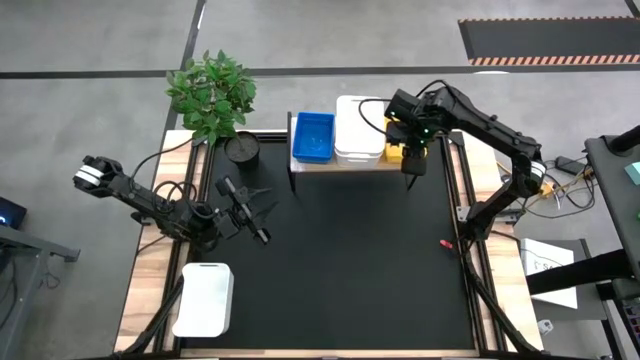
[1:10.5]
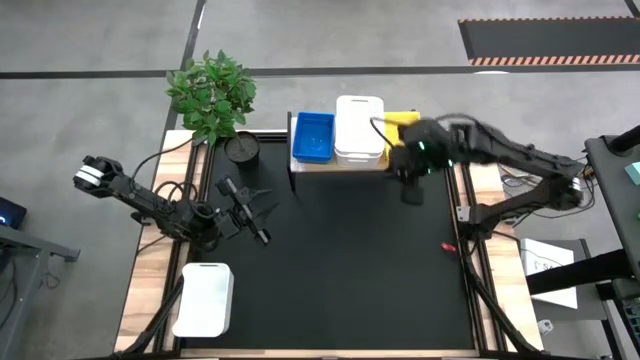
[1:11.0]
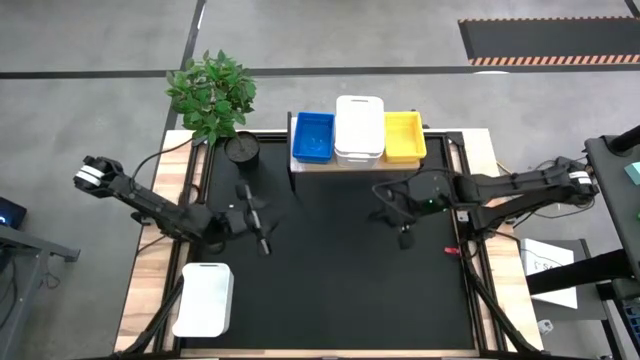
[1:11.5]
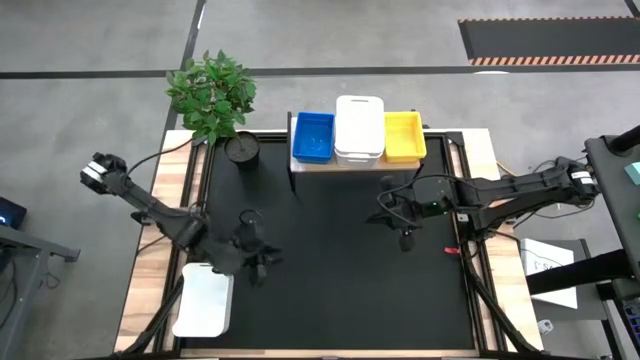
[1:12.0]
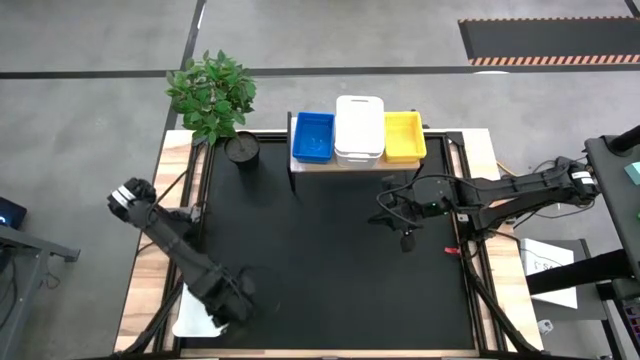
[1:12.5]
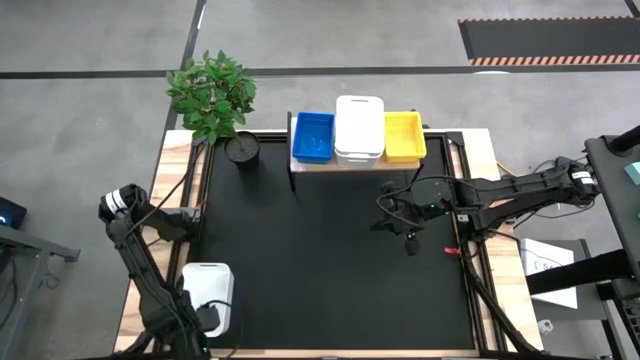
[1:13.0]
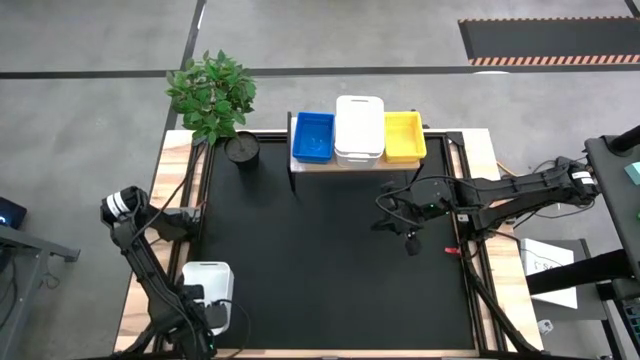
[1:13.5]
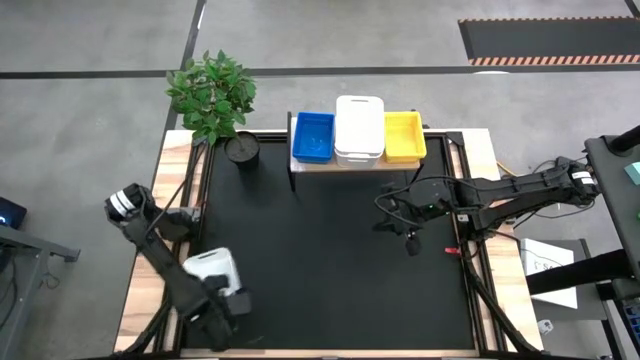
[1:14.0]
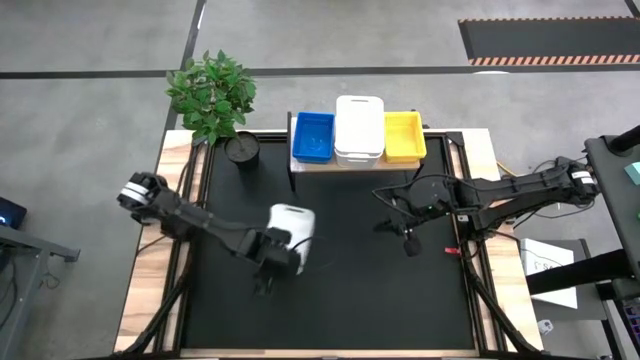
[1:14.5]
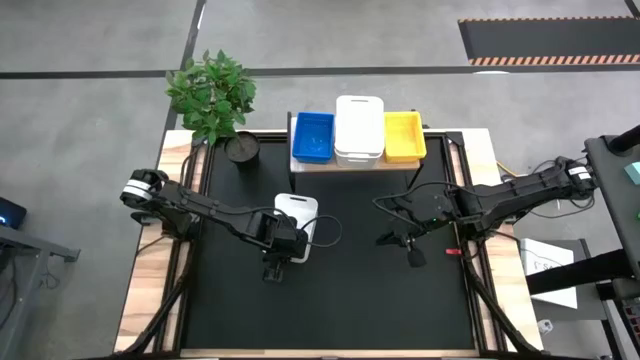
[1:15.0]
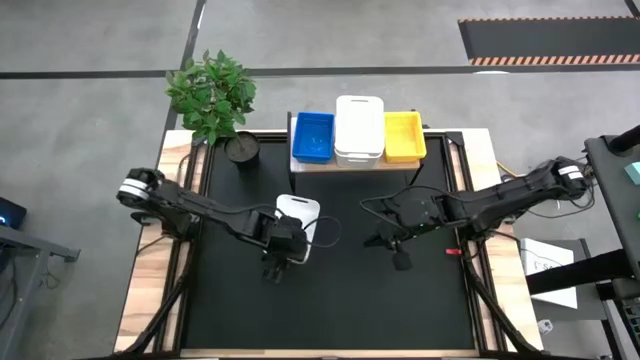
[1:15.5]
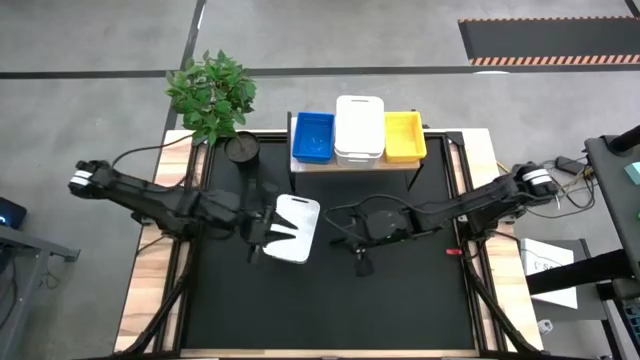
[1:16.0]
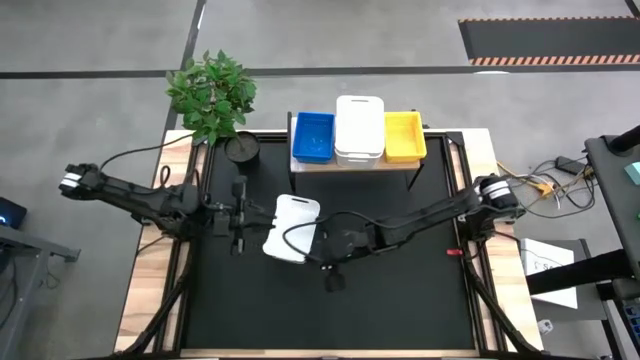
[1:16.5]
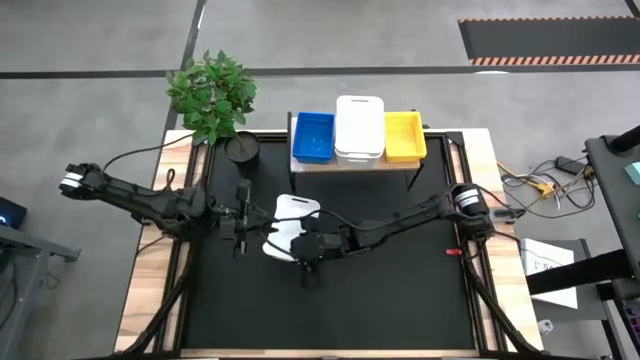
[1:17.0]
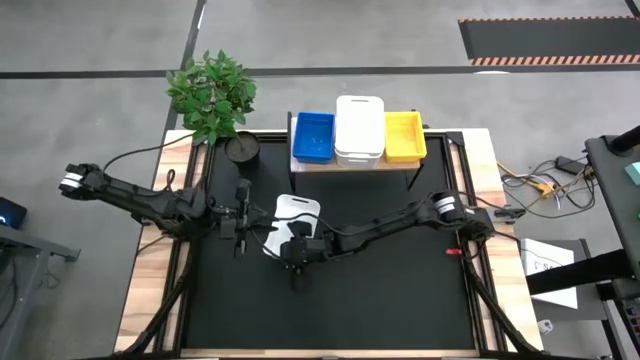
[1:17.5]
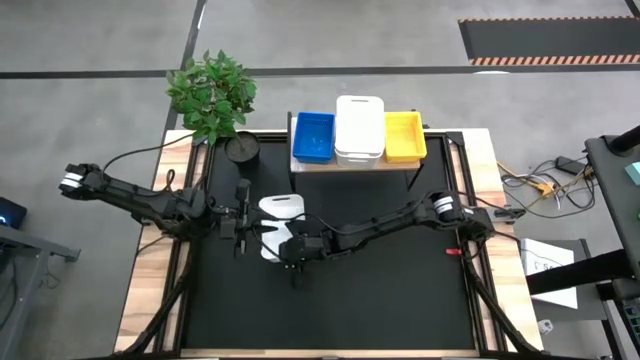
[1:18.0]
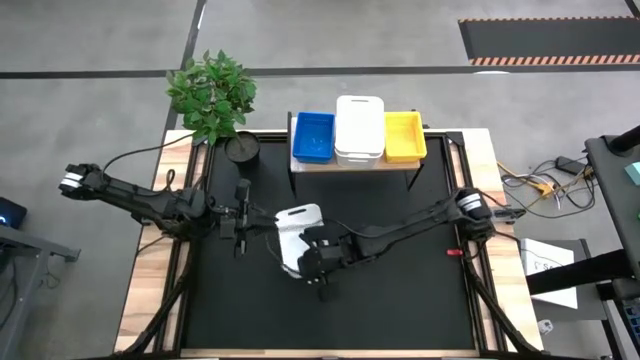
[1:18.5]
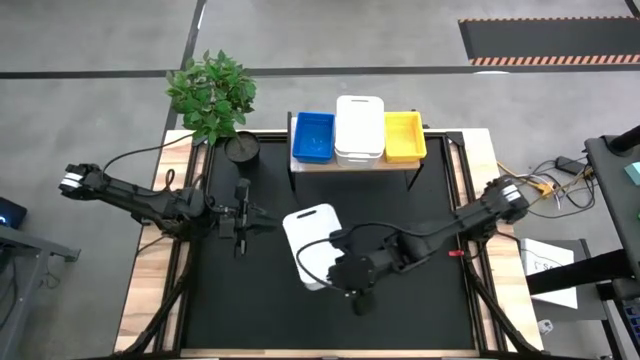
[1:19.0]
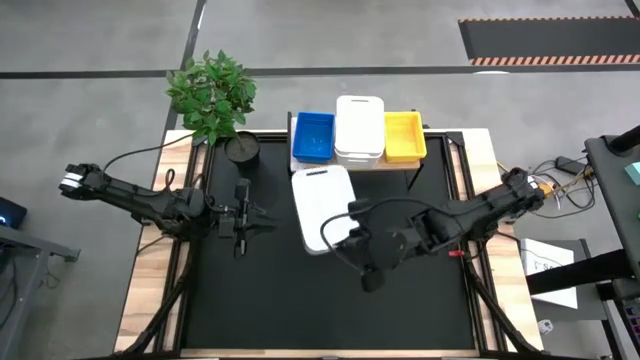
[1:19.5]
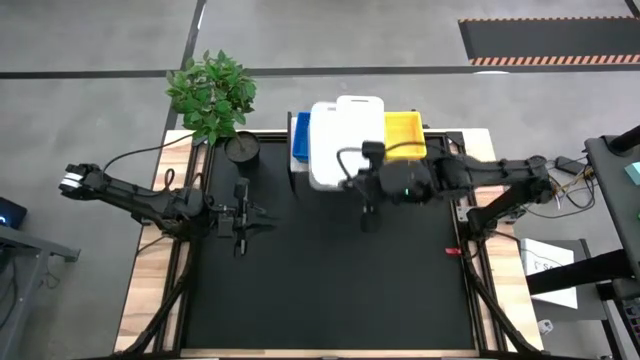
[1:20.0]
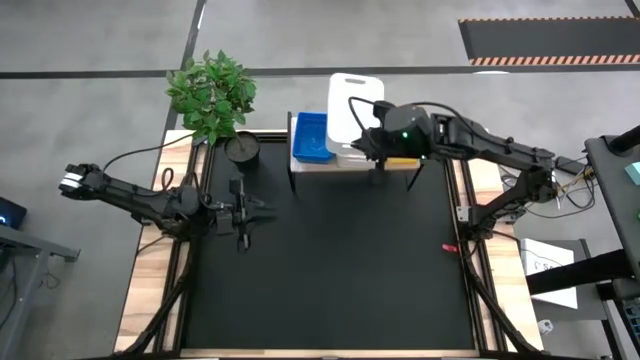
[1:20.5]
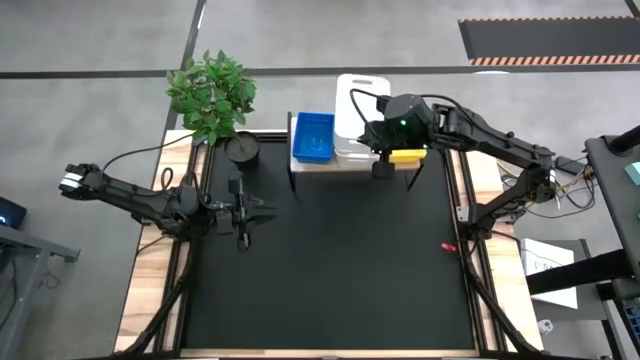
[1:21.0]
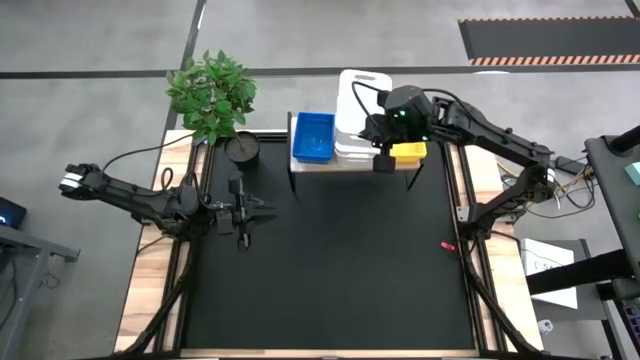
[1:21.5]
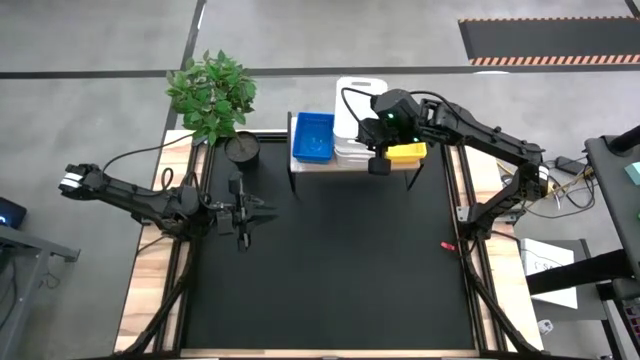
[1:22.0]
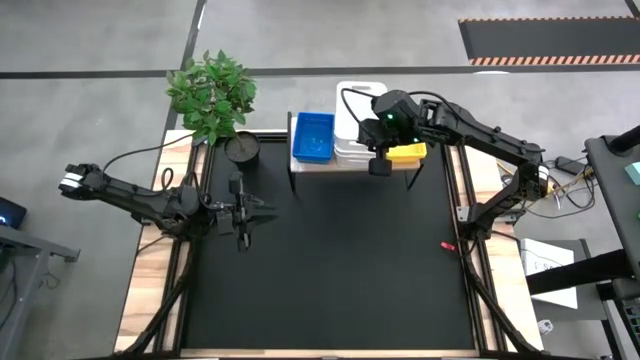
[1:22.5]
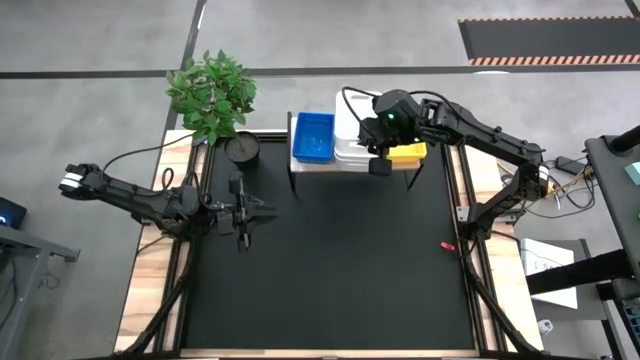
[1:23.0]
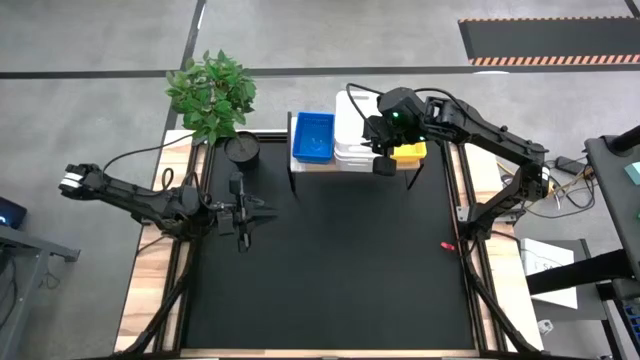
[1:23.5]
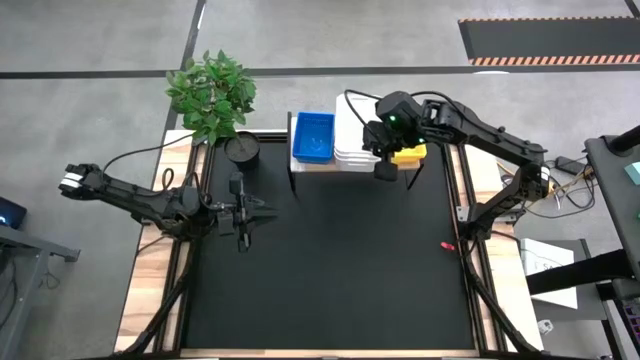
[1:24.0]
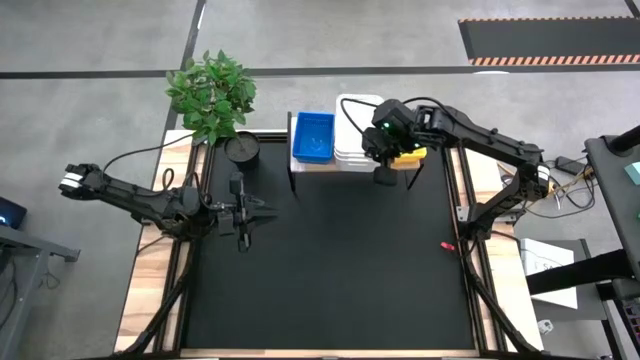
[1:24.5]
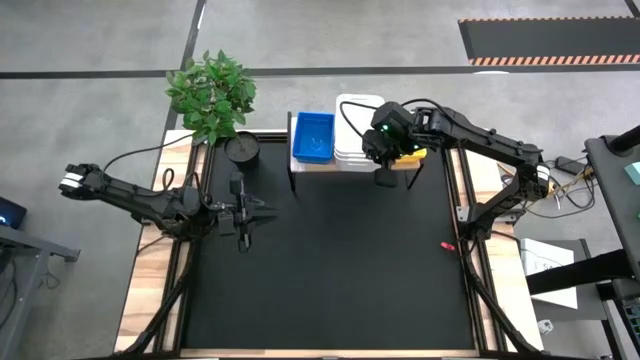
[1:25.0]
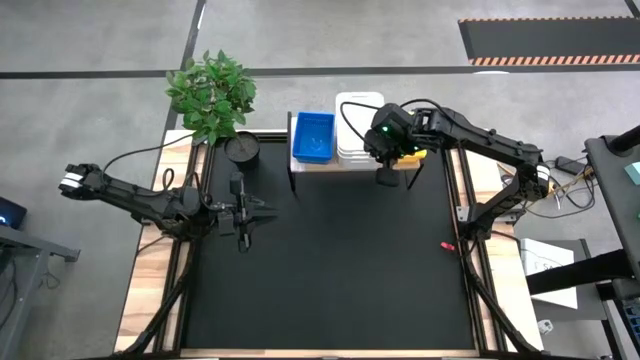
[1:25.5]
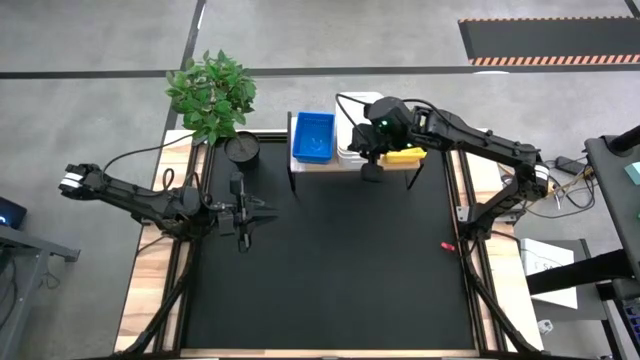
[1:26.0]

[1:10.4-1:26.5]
Task: Stack baskets on shelf by color
Stack the white bin on the other white bins on the shelf

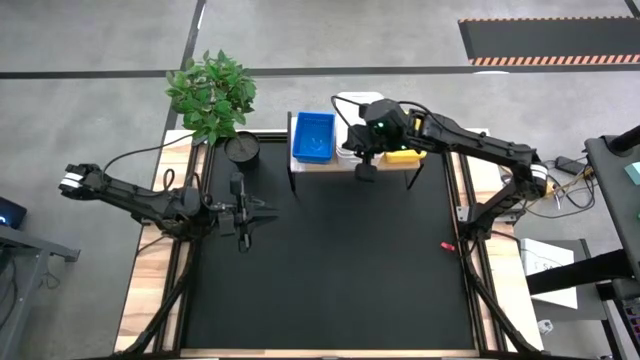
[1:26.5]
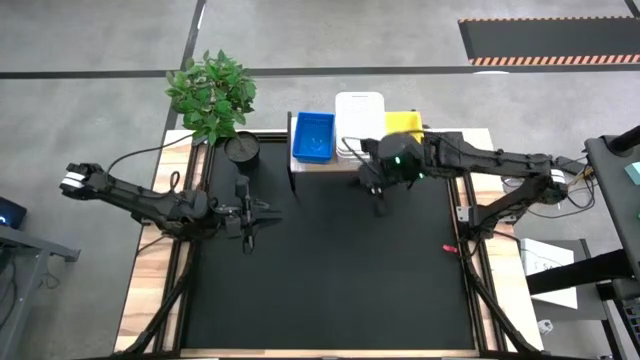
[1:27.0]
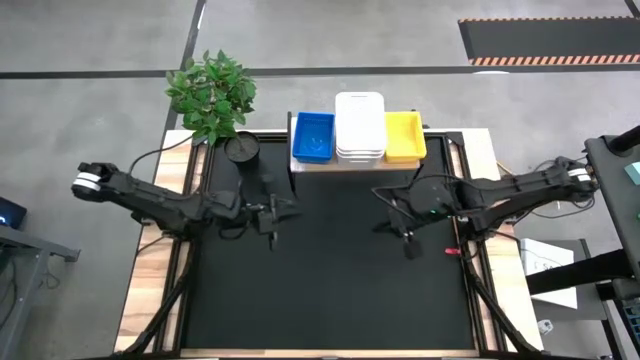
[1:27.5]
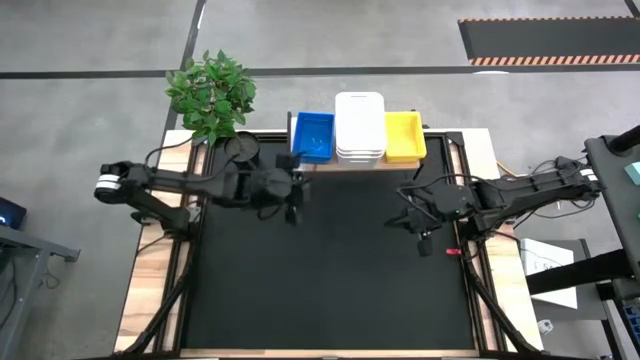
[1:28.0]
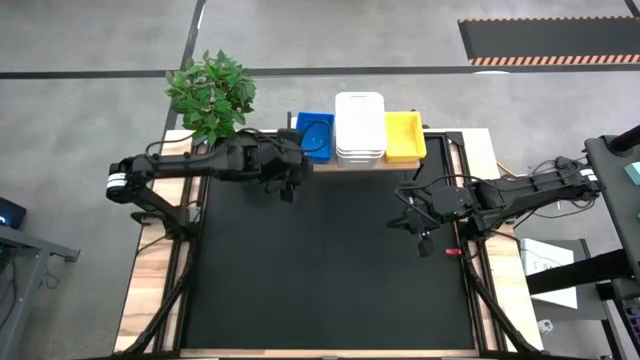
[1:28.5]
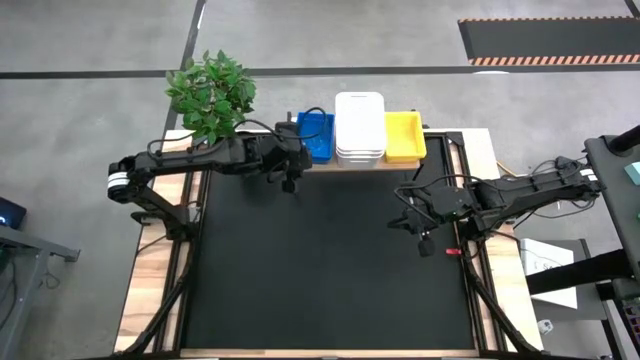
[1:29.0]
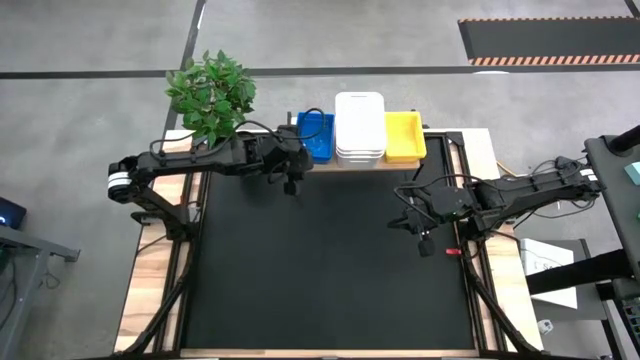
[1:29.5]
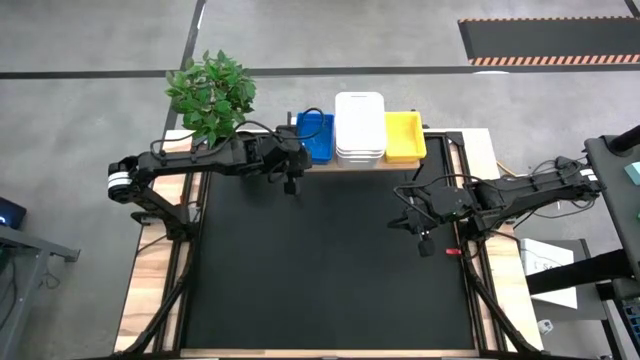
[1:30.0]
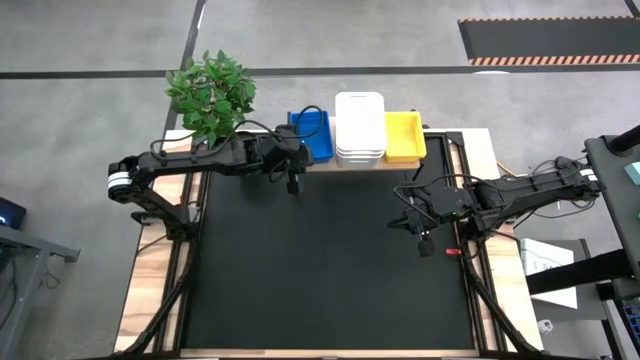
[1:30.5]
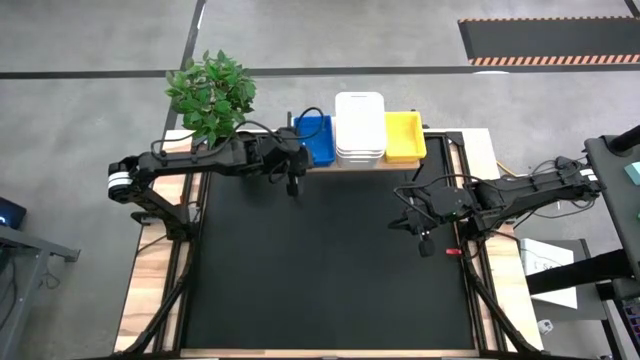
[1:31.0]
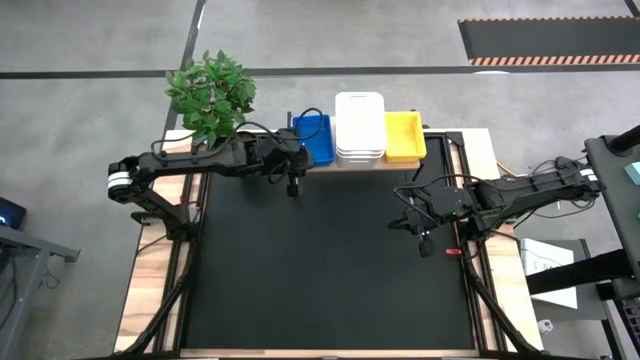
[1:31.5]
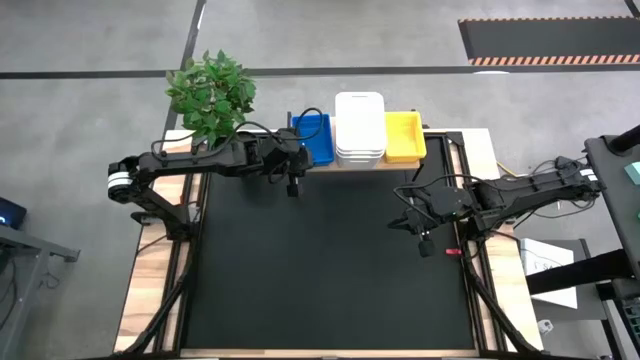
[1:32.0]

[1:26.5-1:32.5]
Adjust the blue bins on the shelf
